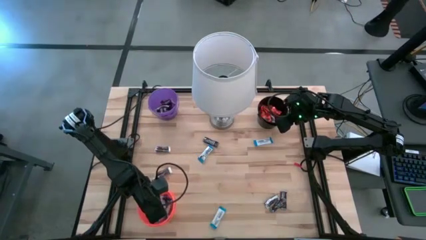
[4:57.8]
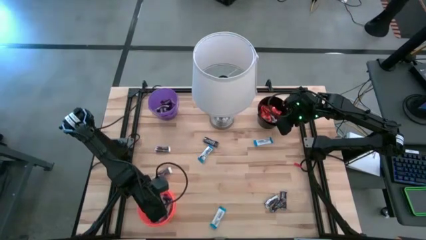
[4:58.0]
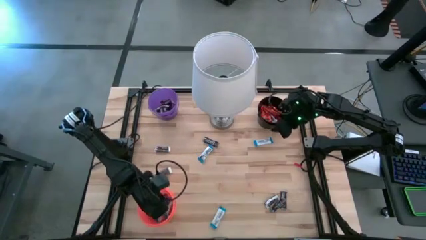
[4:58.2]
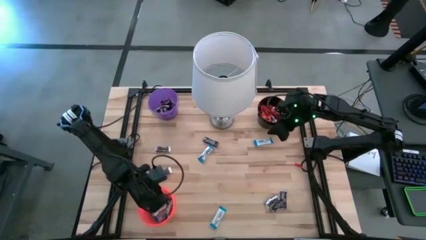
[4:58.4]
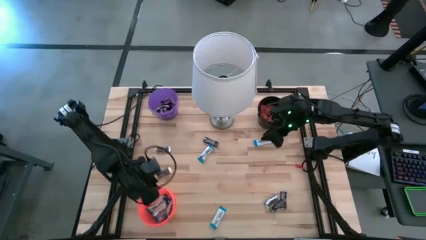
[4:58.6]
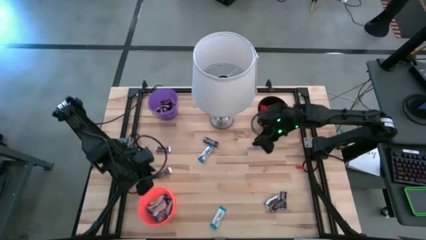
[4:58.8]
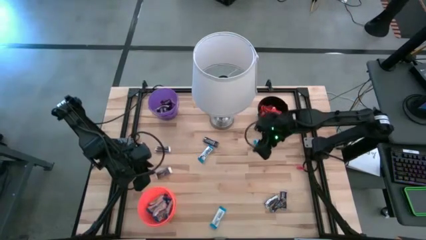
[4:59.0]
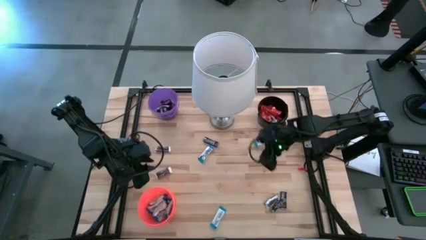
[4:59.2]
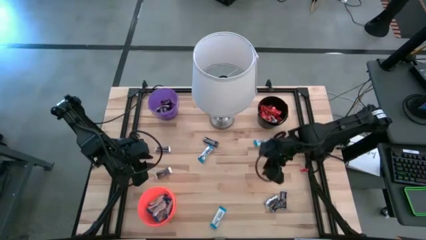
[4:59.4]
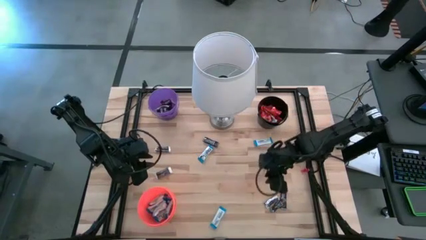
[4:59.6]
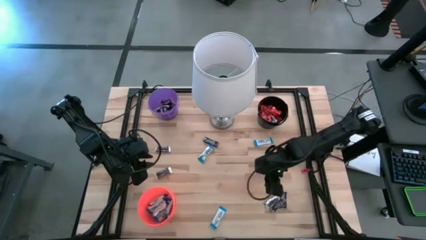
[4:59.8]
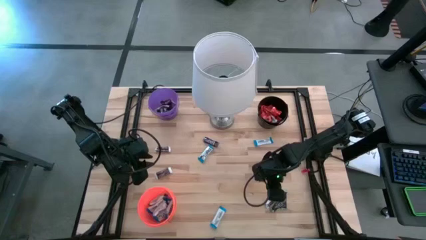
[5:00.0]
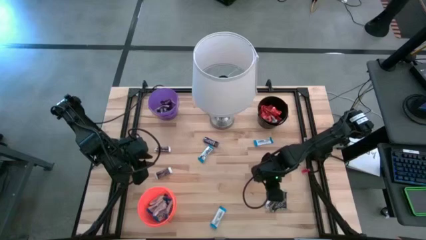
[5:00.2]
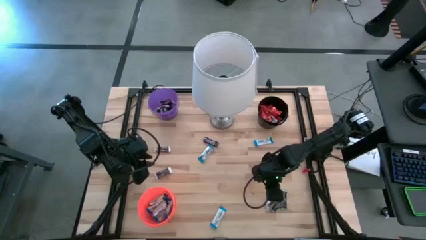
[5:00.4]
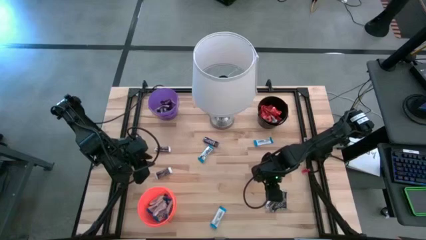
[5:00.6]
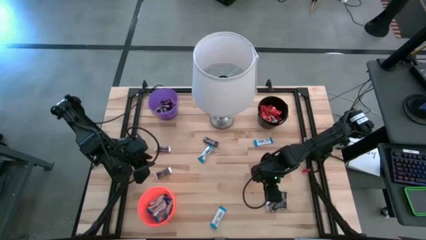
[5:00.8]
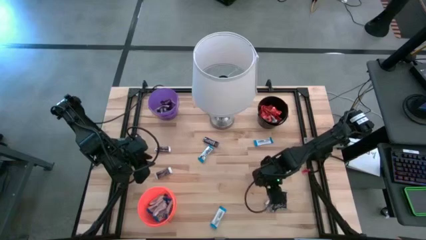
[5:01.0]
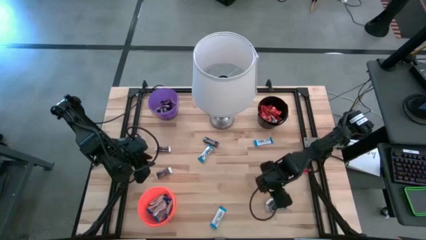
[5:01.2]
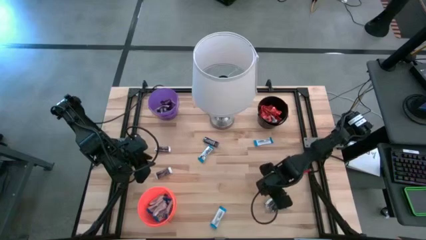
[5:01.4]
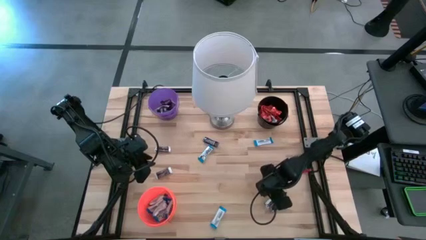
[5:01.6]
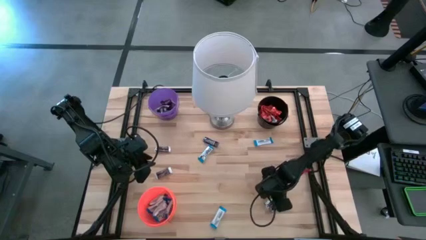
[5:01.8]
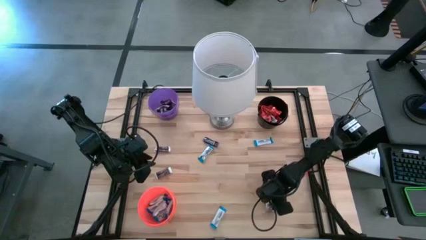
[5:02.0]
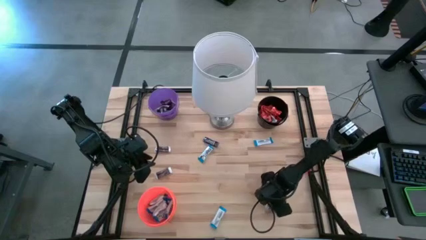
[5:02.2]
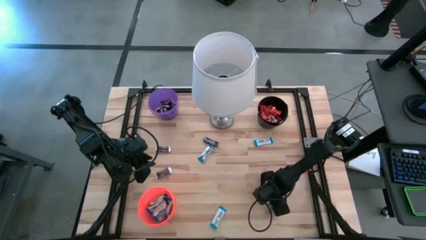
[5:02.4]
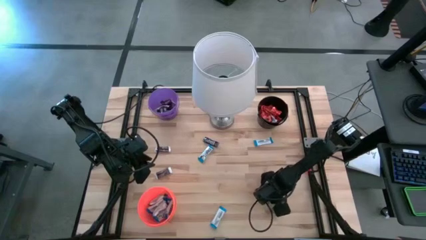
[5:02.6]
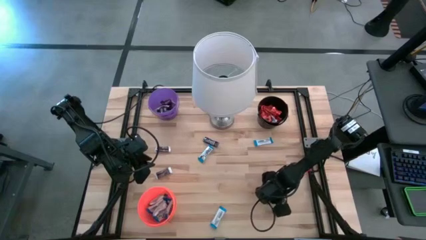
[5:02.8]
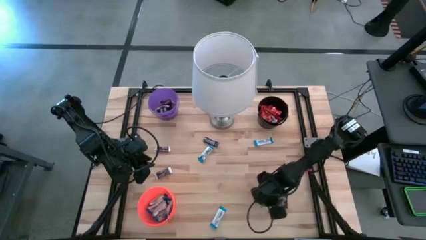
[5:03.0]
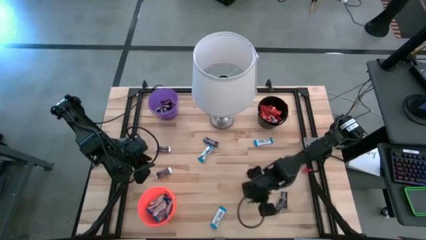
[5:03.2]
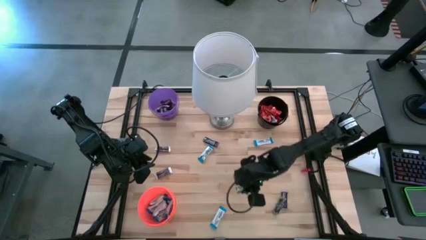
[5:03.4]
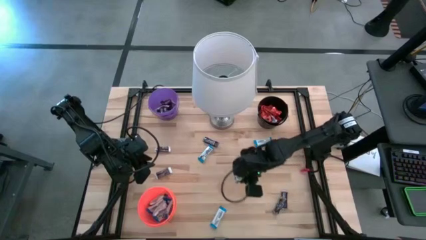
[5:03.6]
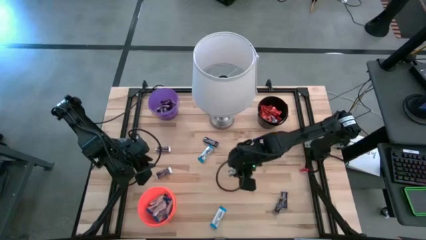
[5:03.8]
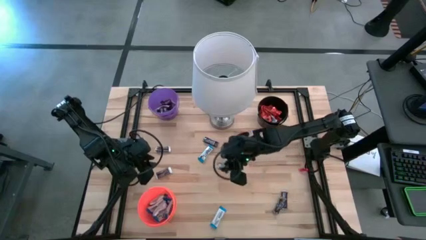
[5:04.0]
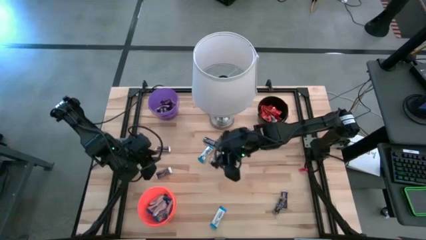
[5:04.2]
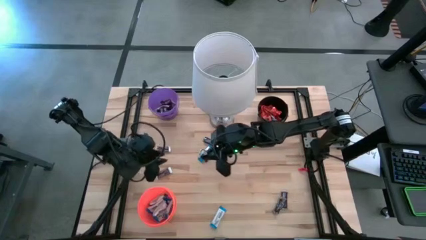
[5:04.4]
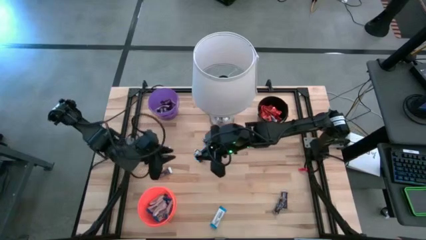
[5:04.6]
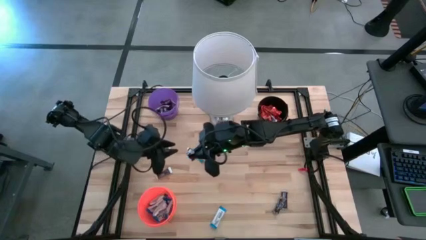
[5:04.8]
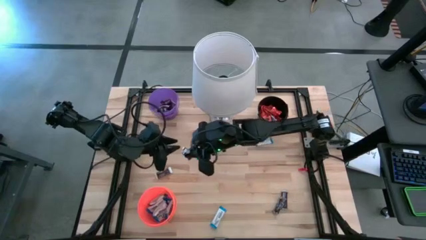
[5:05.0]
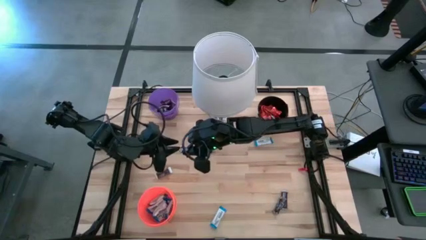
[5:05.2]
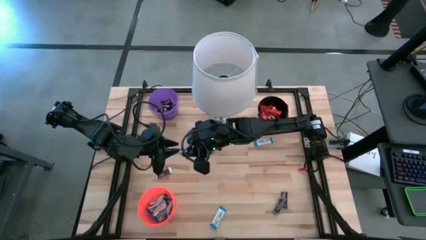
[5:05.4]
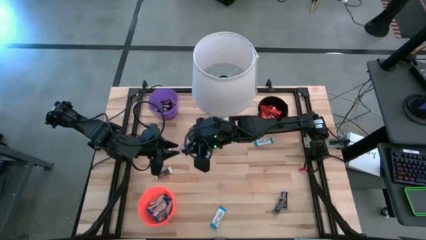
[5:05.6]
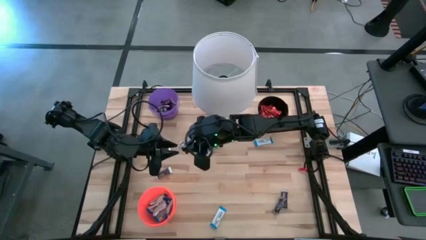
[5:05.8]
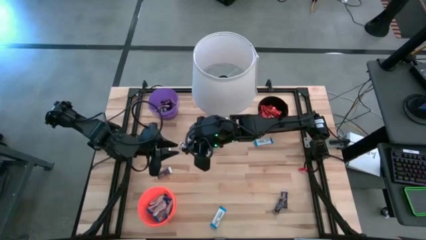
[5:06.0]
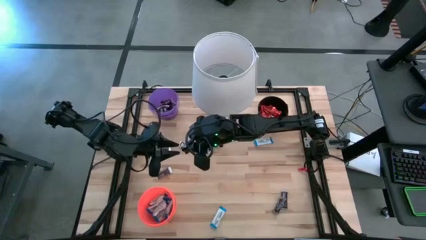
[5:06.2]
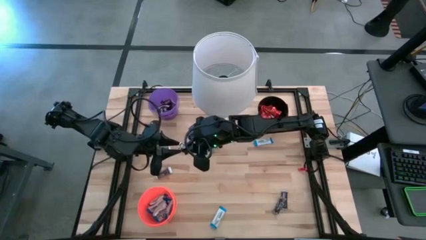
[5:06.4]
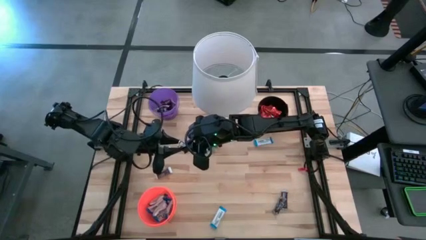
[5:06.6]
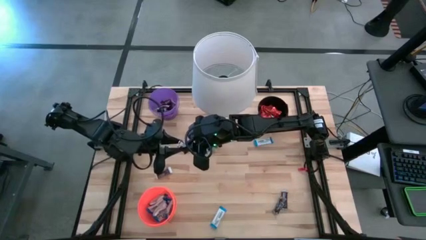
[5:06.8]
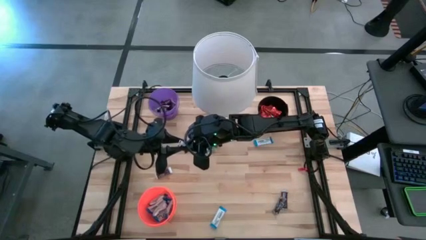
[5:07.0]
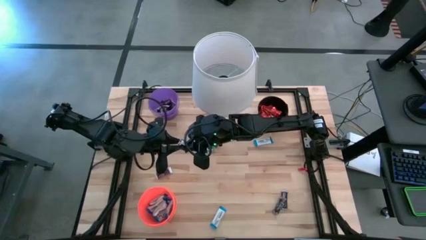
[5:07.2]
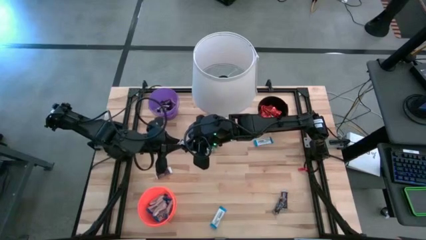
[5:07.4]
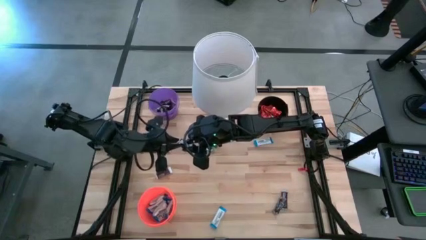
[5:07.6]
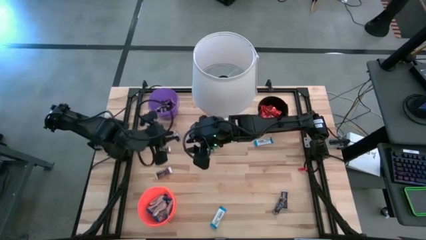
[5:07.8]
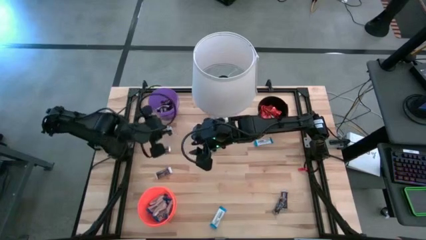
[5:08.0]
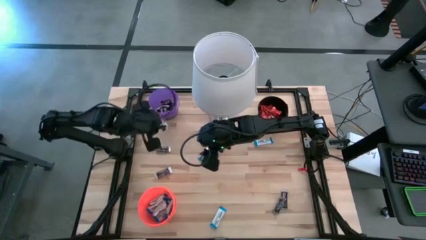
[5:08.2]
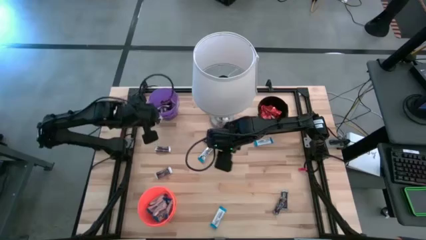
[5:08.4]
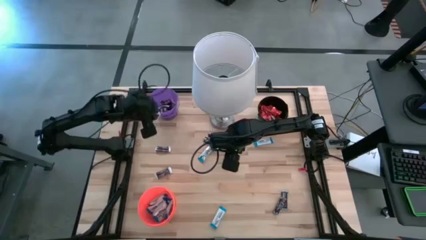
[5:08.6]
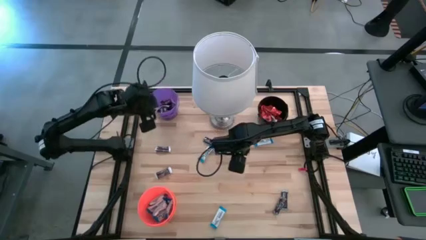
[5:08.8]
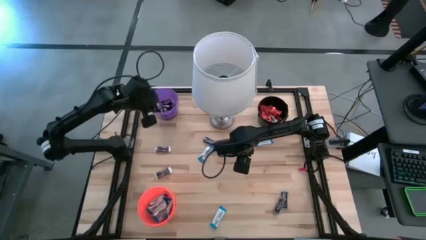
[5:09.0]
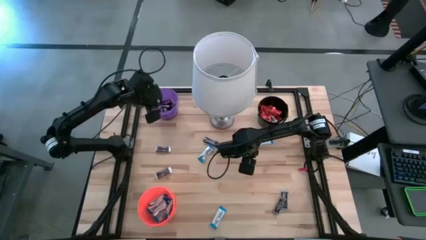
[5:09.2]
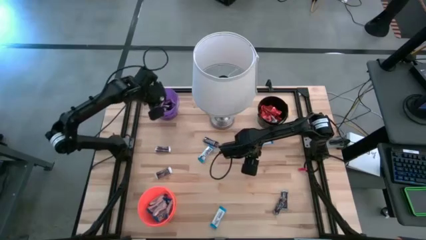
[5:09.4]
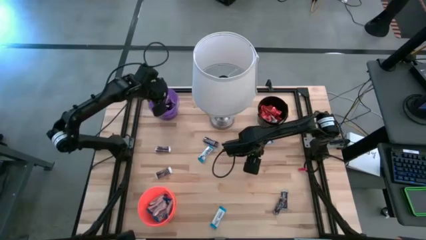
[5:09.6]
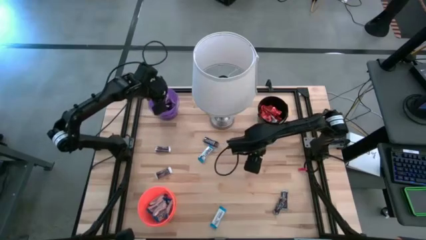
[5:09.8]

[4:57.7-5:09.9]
Task: Organize candy in baskets
Put the brown chocolate bar into the purple bucket

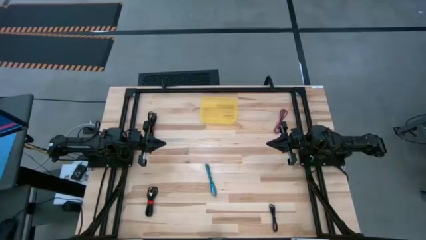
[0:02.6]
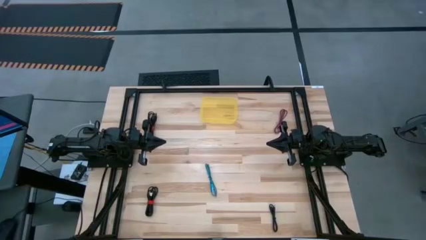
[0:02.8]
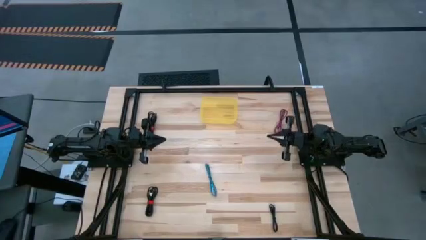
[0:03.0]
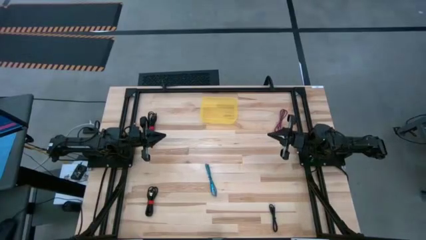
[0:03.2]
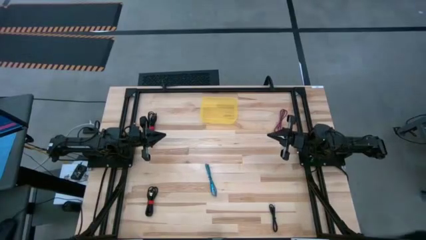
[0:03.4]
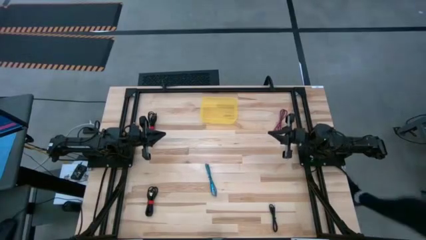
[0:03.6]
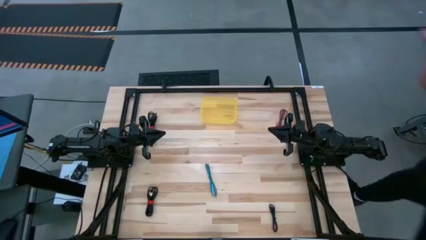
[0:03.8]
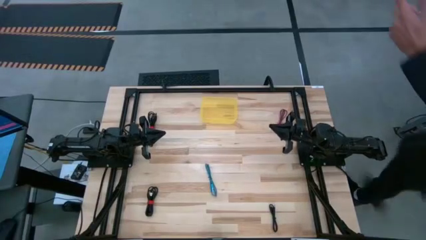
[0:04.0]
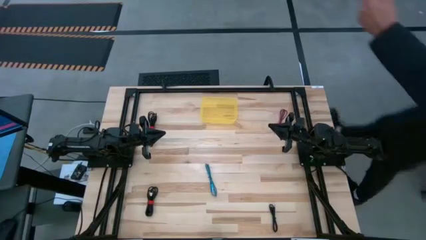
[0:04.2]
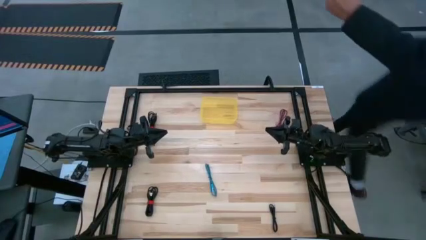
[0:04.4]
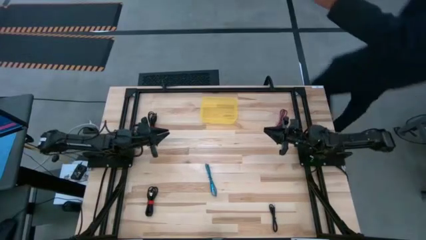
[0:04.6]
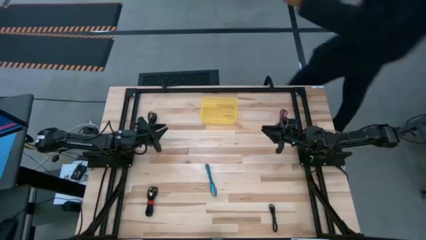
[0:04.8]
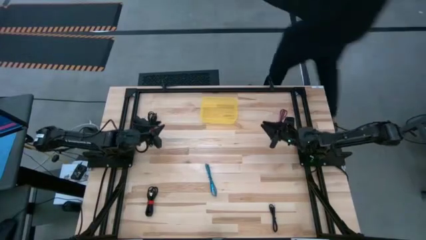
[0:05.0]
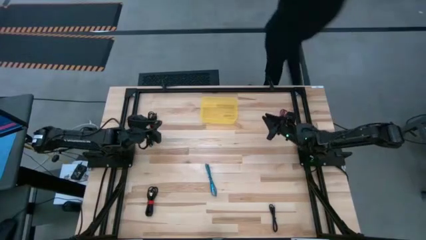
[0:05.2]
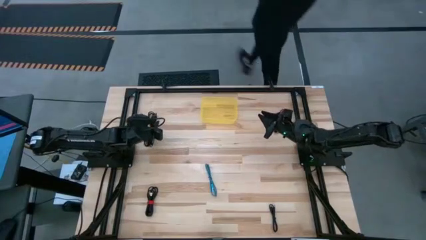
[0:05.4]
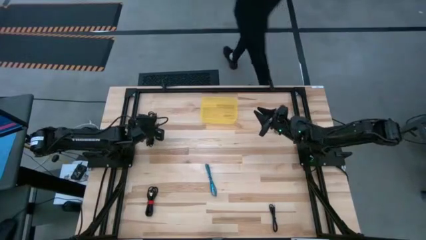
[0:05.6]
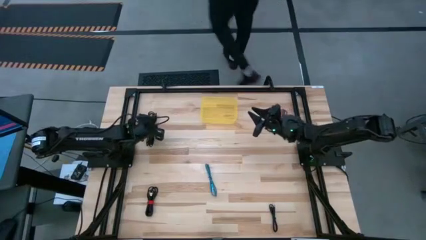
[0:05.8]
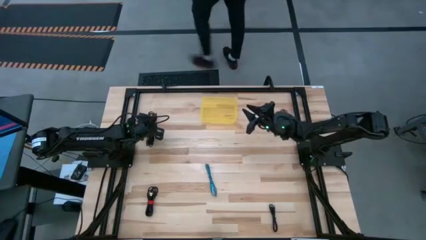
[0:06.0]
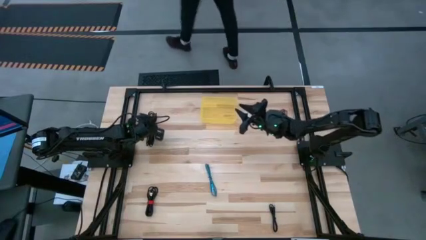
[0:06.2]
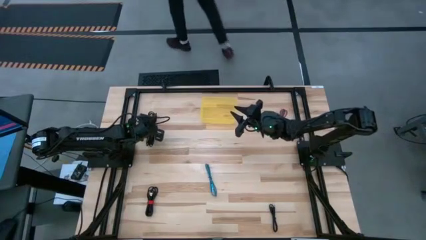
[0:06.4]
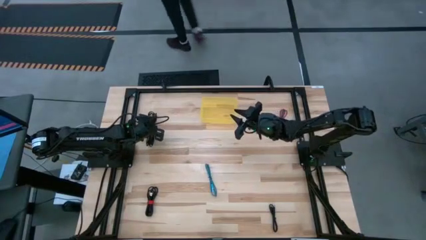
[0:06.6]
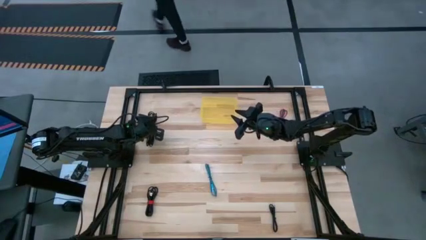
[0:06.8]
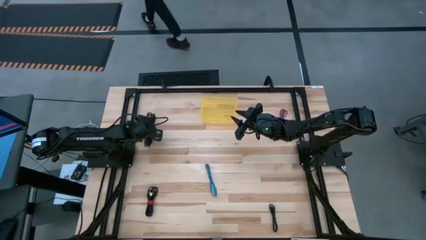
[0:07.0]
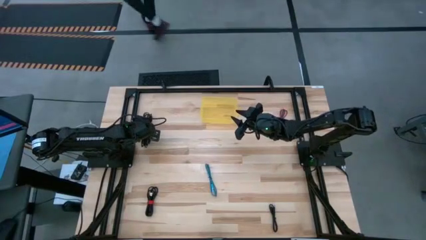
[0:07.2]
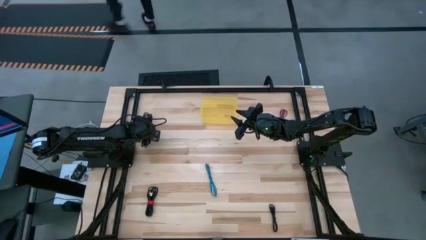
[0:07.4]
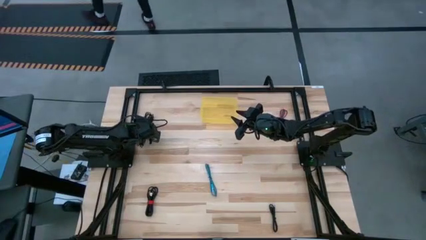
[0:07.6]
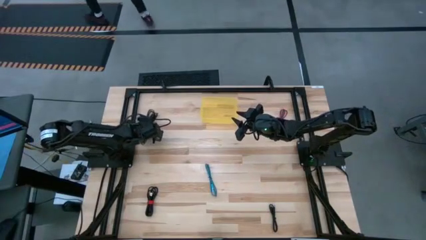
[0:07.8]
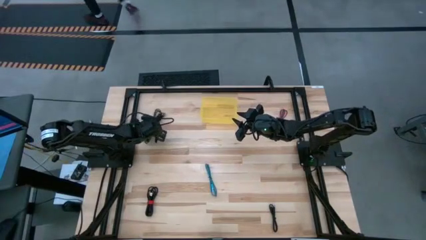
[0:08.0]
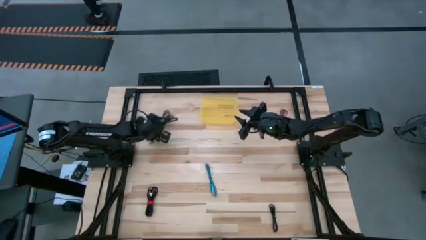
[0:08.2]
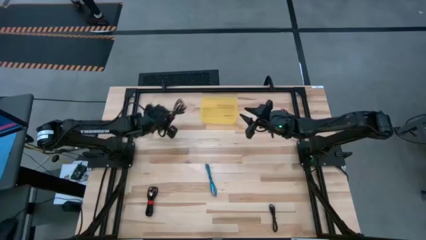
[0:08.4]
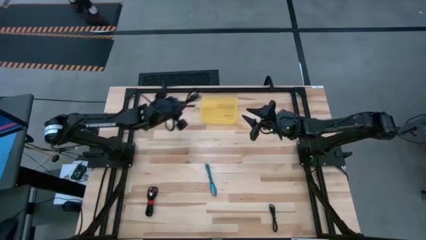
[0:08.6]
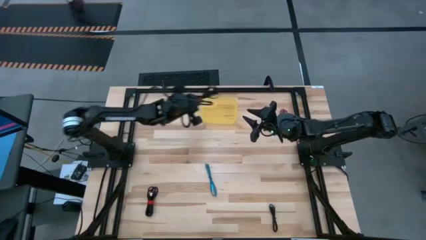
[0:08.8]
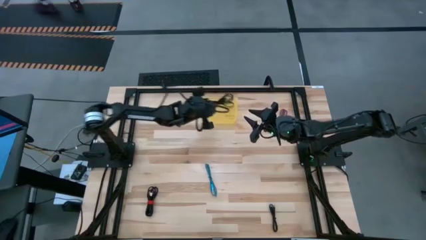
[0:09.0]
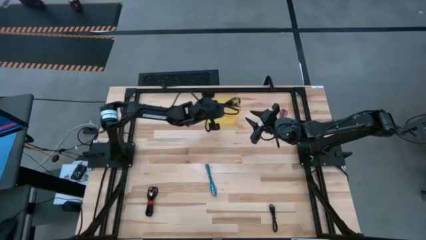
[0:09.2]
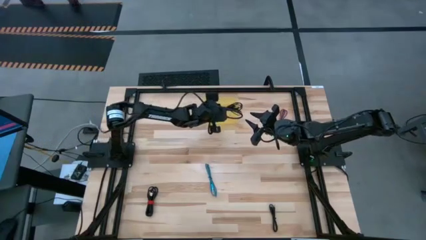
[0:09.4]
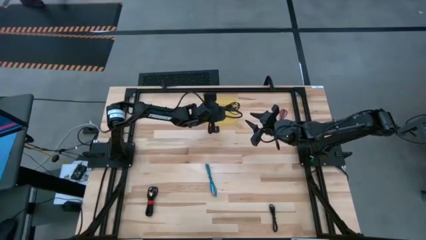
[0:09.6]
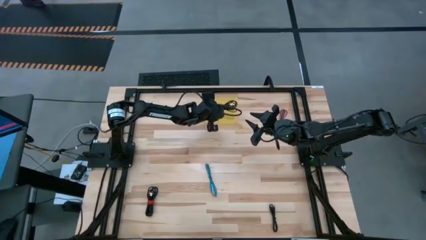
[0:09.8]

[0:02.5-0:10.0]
Task: Pick and place USB-C Cables
Put the top black charger cable into the yellow container
